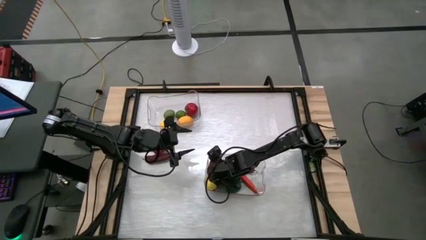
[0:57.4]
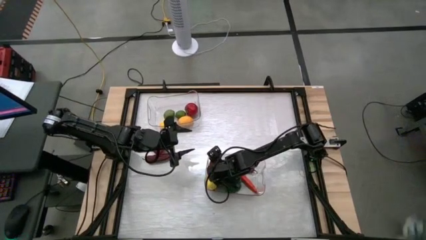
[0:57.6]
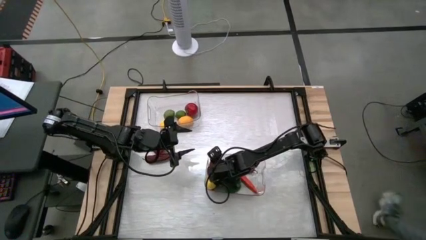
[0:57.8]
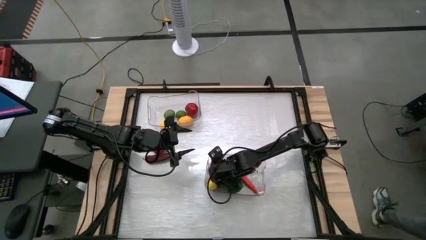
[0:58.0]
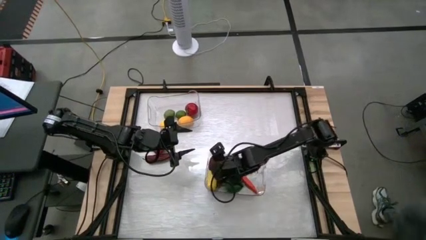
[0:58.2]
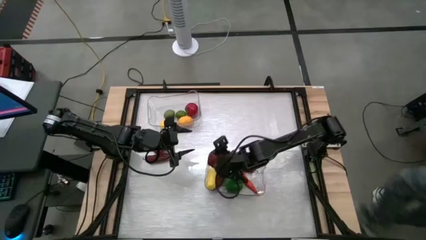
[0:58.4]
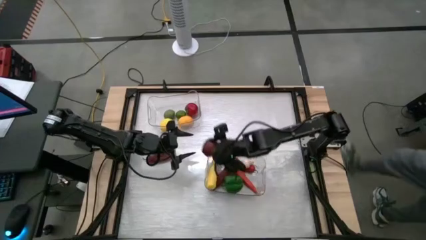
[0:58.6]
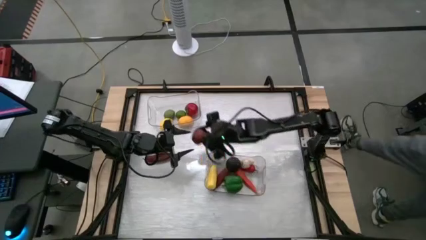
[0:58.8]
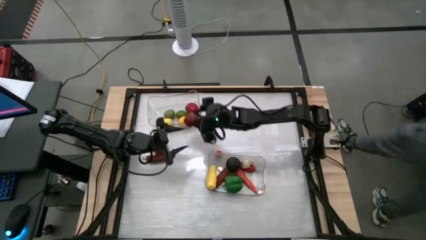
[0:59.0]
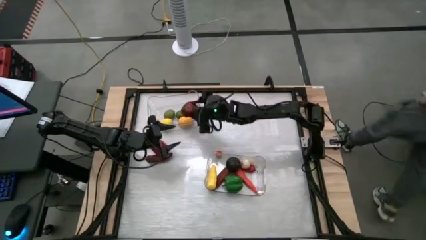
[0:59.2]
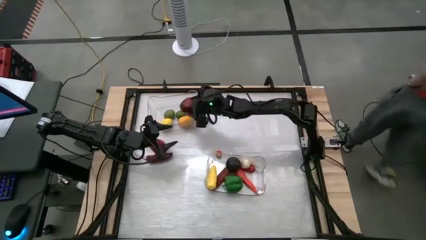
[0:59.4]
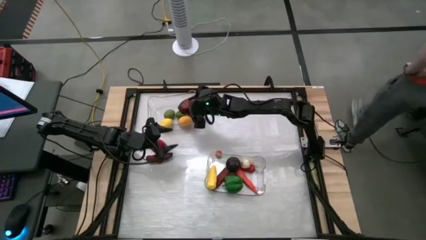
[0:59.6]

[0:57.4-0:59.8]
Task: Sort produce into baskets
Put the red apple into the top transparent bin

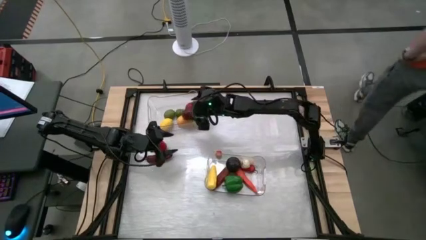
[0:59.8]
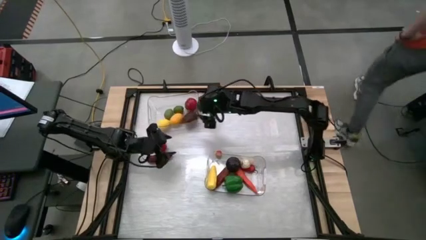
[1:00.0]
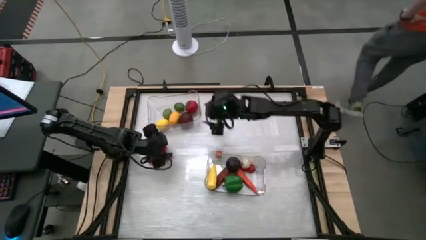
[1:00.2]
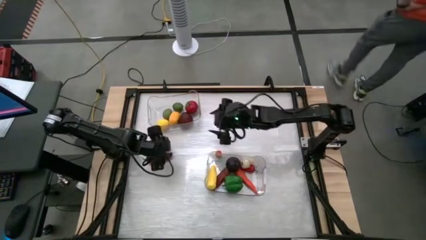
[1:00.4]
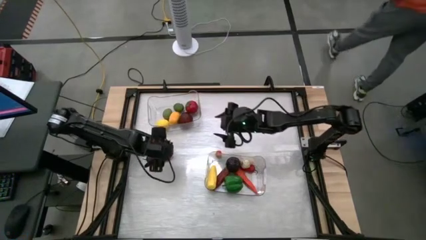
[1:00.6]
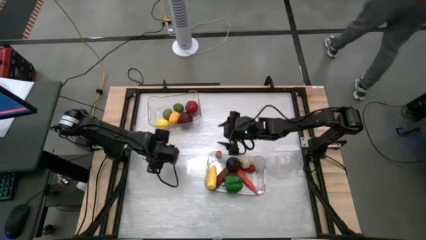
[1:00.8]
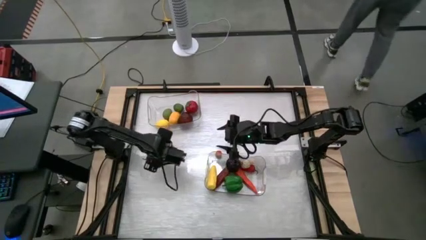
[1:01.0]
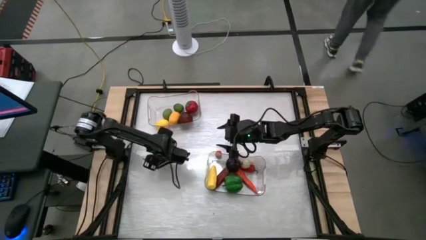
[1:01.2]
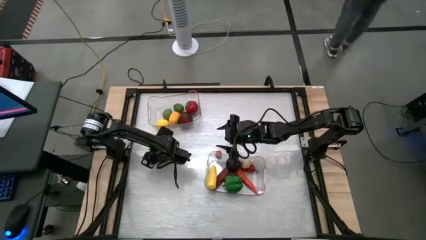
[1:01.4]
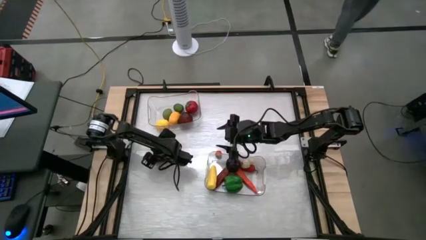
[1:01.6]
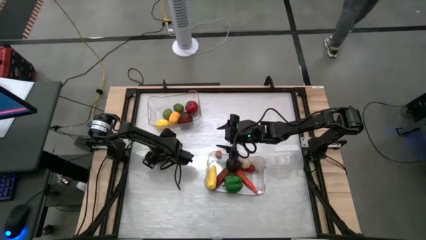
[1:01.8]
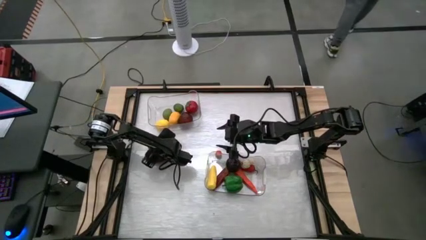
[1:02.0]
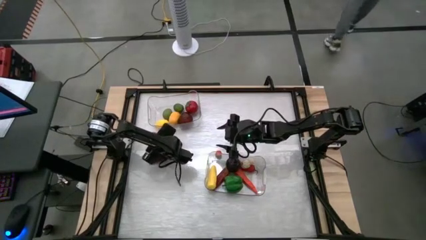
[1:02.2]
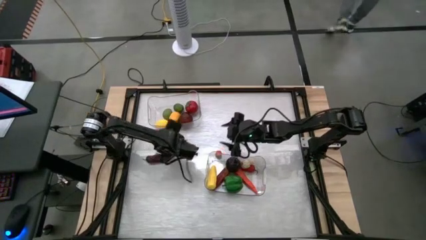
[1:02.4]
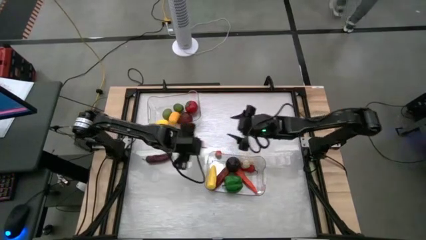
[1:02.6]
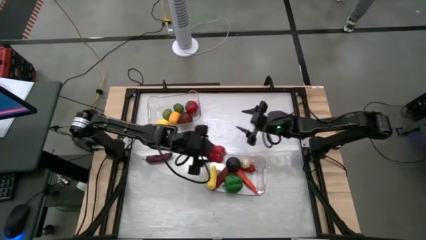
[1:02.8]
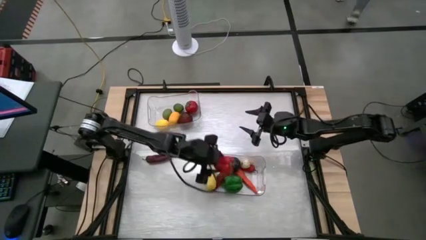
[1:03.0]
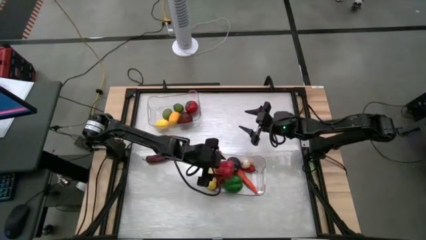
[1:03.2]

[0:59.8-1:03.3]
Put the red bell pepper into the bottom transparent bin

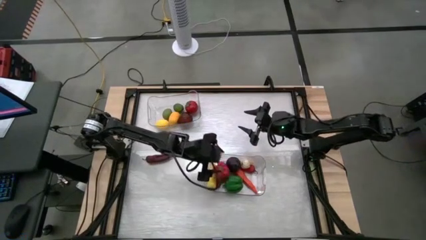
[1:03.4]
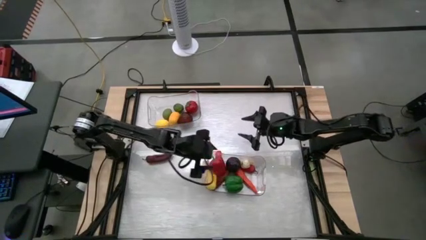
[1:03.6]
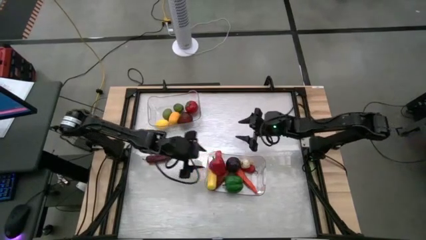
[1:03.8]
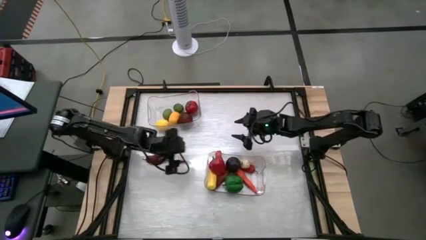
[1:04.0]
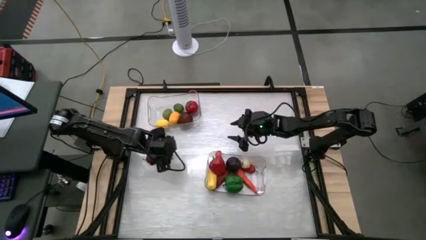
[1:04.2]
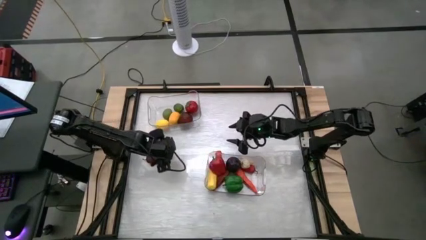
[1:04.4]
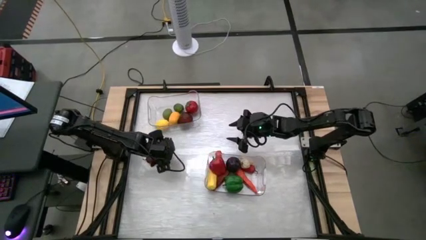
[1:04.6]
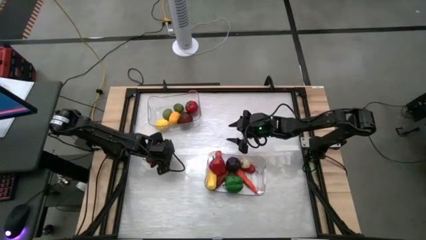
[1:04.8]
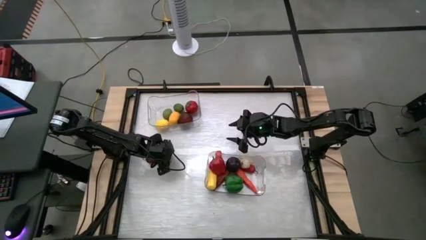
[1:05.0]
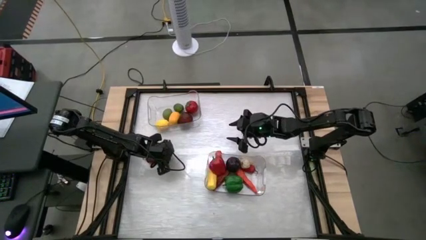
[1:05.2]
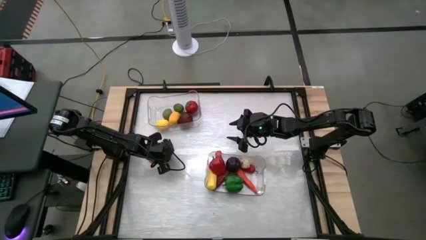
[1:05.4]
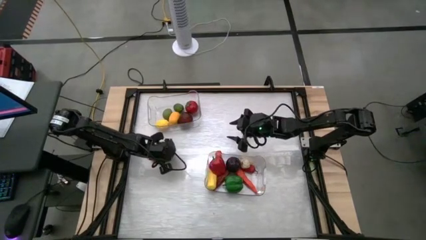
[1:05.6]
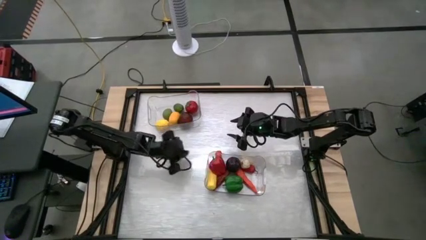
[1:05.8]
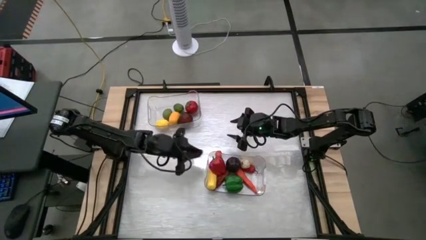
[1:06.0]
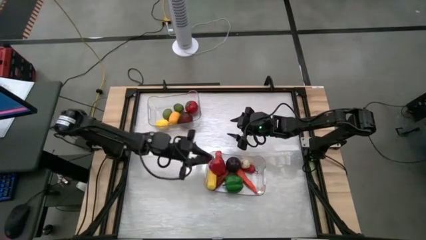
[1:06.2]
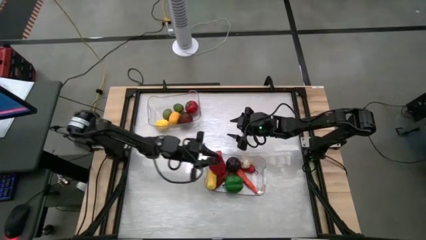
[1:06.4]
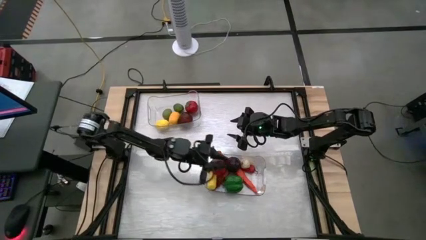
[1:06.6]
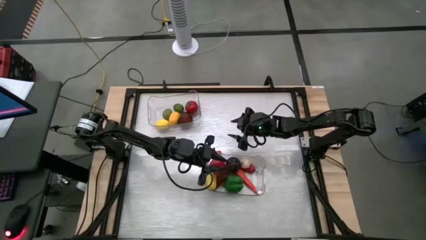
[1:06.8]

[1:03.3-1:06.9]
Put the red chili pepper into the bottom transparent bin

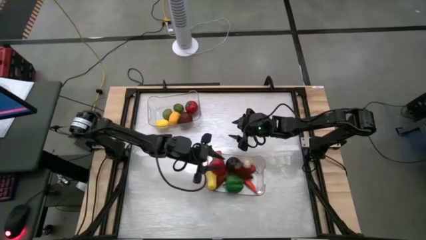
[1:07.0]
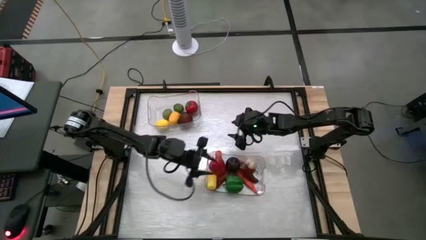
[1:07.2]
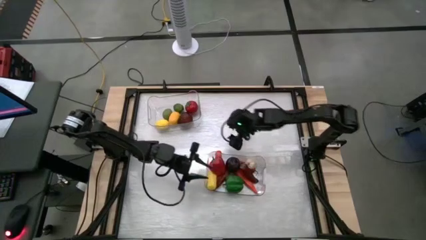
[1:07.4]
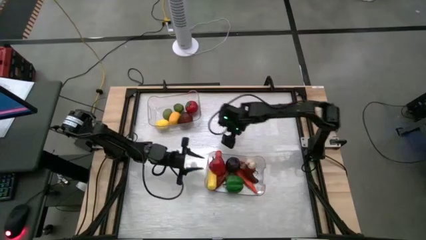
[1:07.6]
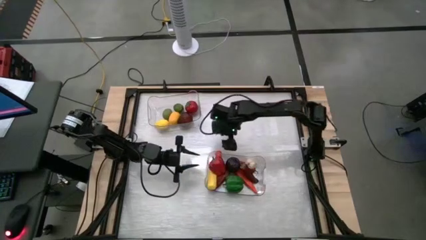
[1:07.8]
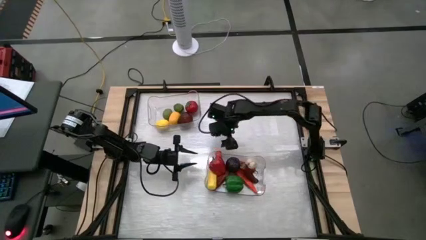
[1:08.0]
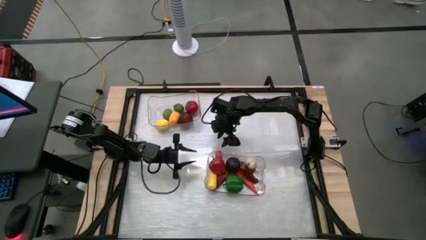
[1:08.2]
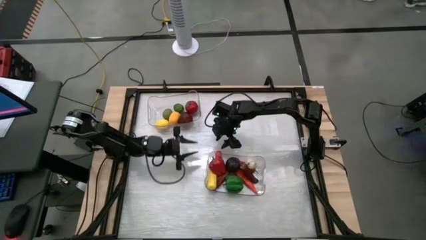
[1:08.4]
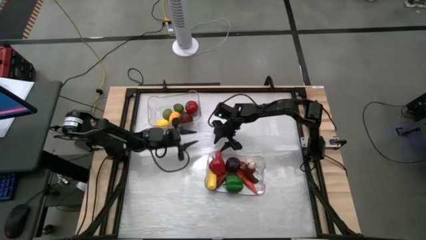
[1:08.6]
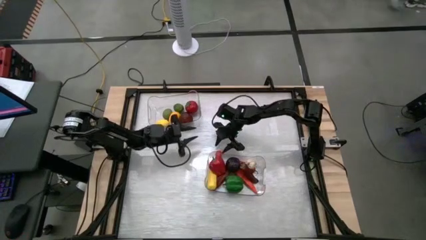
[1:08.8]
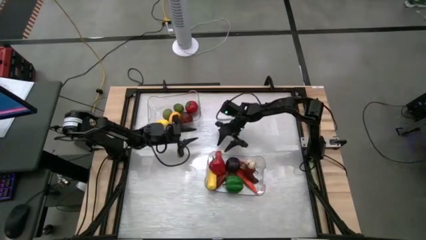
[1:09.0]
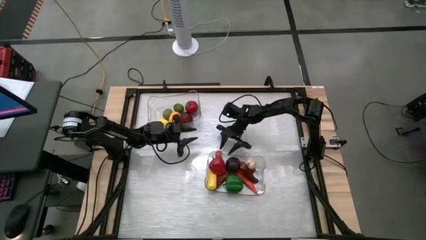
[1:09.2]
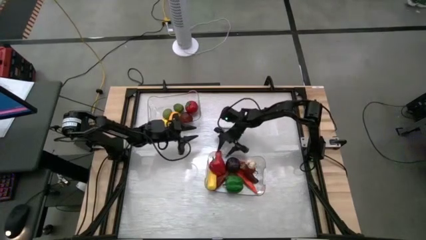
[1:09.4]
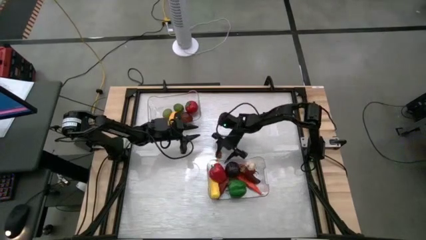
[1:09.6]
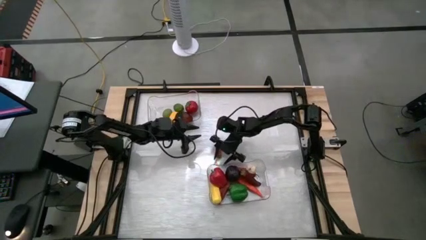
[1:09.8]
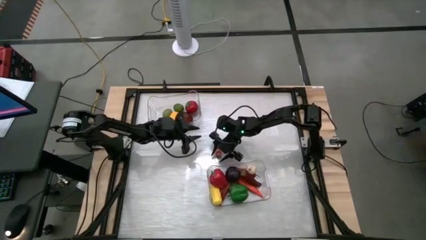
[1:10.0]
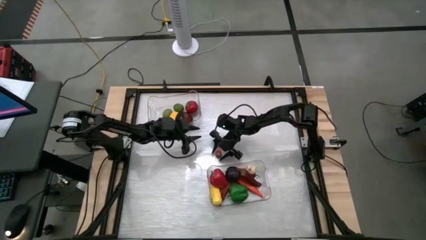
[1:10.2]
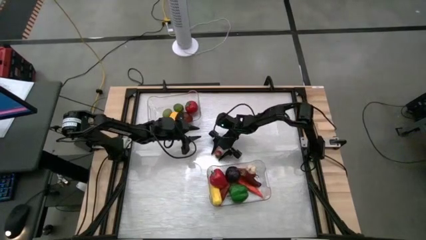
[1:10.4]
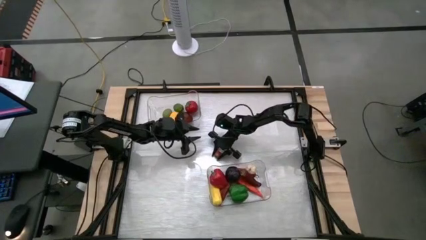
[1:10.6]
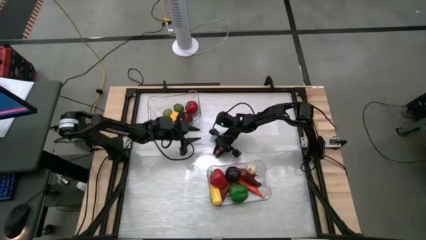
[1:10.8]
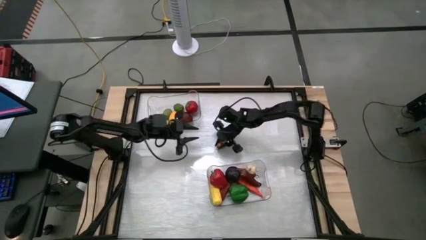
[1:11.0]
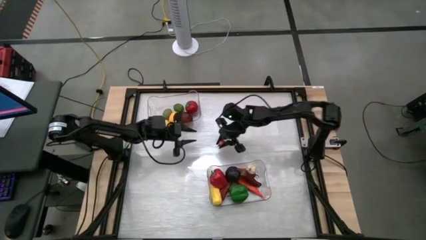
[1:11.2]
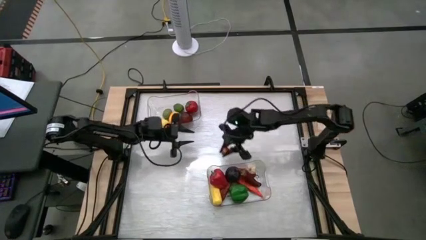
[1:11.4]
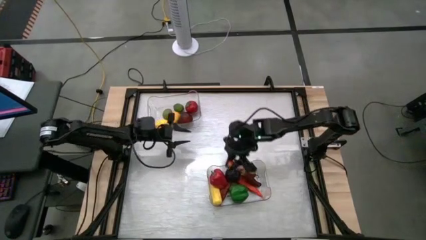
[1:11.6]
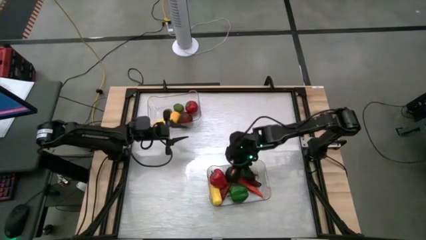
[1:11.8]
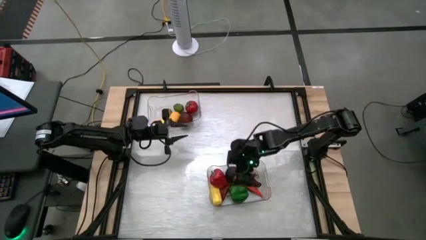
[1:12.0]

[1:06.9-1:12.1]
Put the peach from the top transparent bin

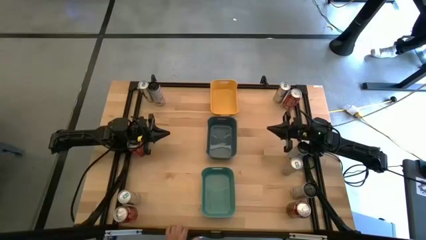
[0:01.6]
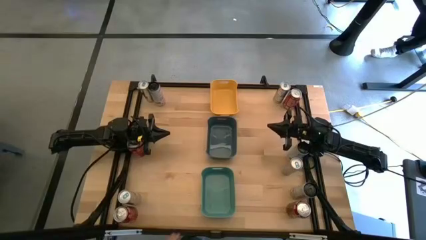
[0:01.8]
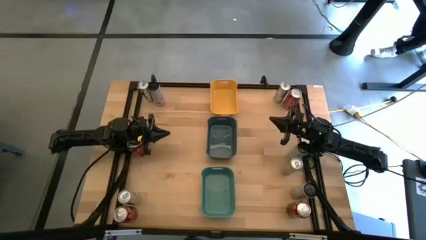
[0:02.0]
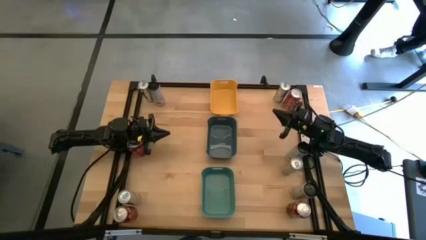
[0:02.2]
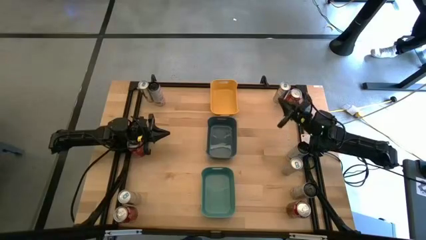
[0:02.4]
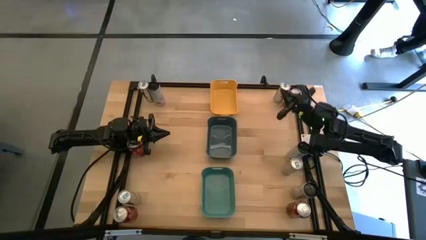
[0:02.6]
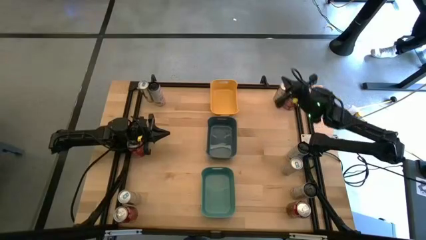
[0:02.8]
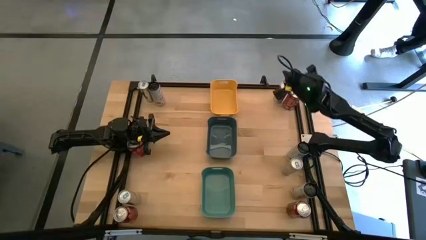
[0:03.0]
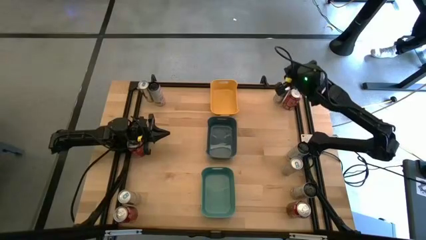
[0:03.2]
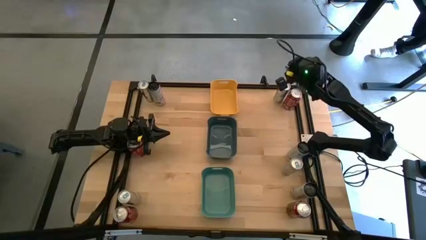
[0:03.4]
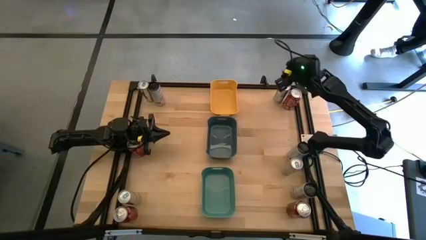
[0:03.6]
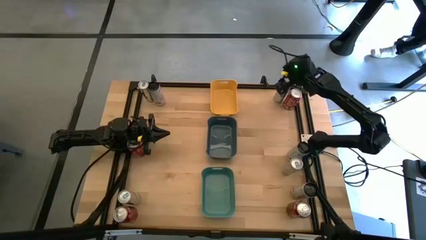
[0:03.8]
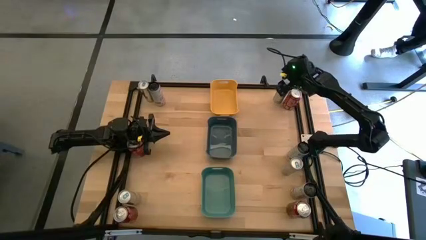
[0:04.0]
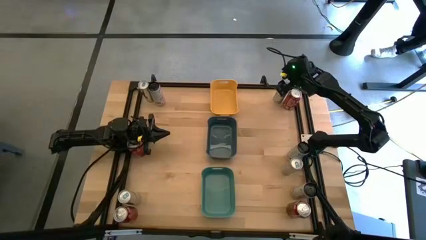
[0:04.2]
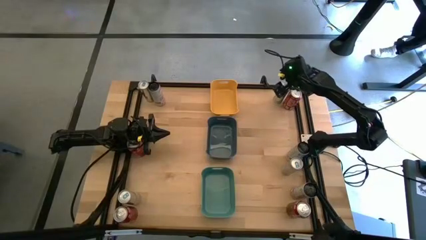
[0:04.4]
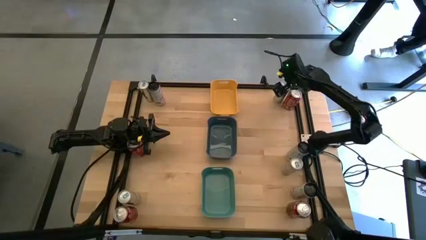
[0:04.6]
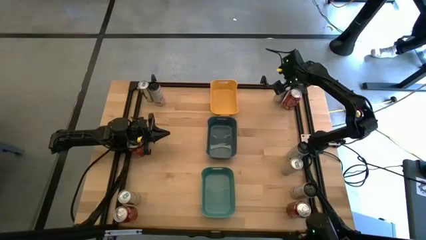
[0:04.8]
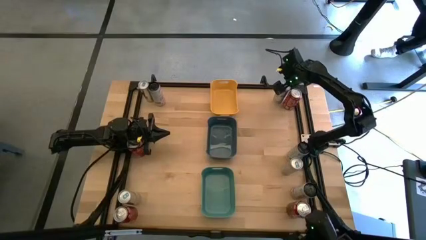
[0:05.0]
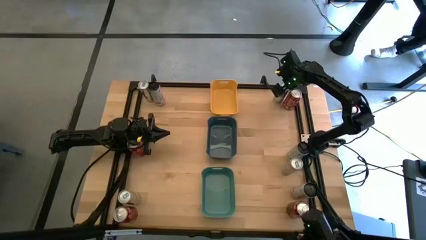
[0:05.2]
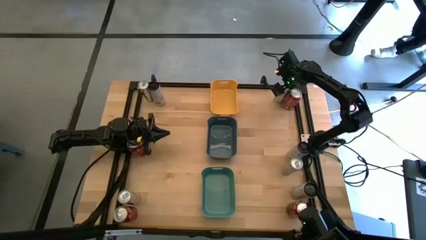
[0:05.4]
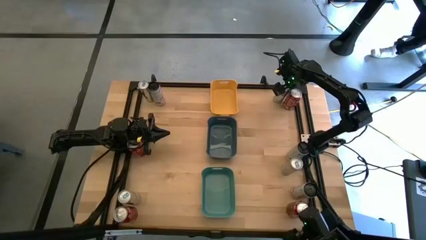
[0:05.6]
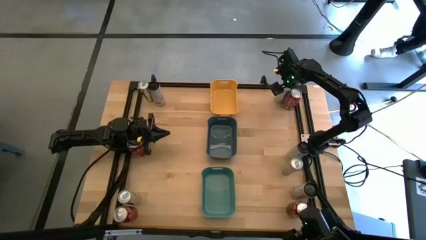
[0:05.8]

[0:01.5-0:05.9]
Task: Sort soda cans
Put the top right blue soda can into the yellow bin
